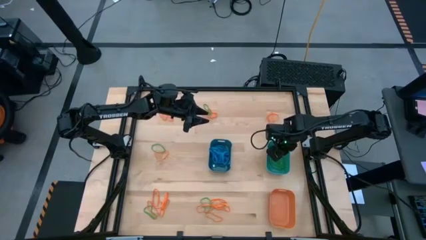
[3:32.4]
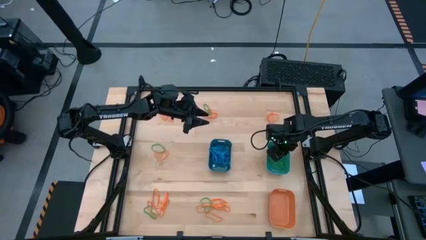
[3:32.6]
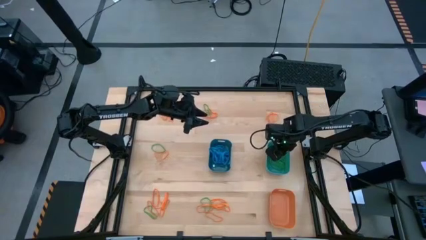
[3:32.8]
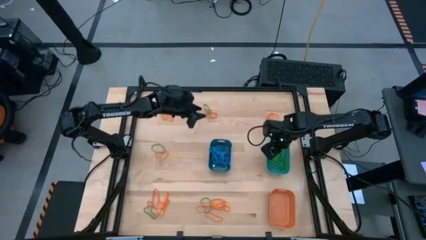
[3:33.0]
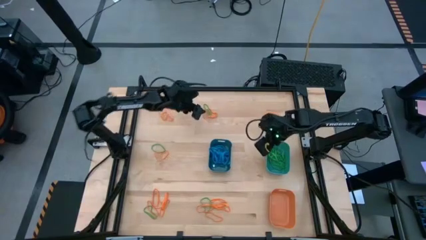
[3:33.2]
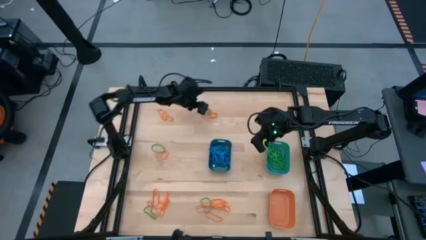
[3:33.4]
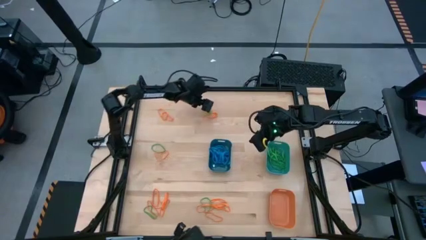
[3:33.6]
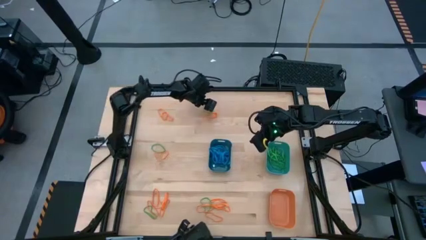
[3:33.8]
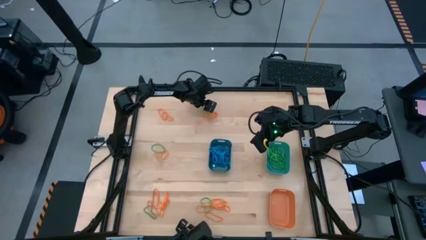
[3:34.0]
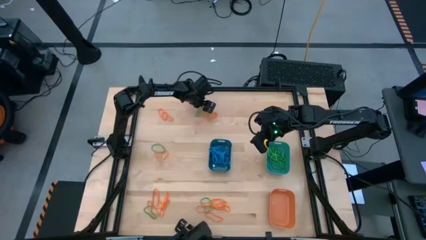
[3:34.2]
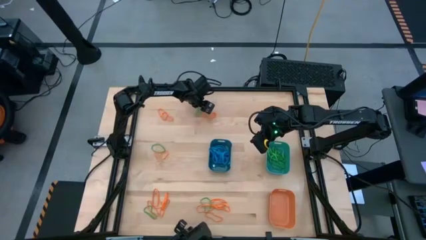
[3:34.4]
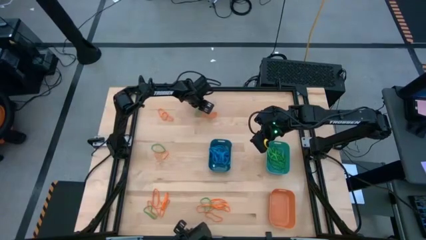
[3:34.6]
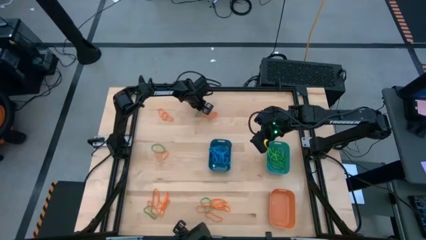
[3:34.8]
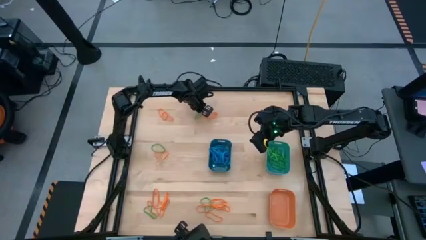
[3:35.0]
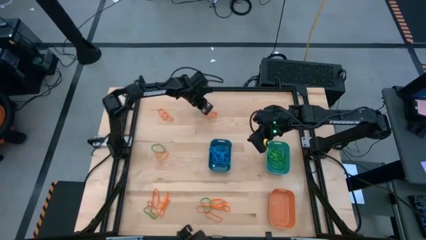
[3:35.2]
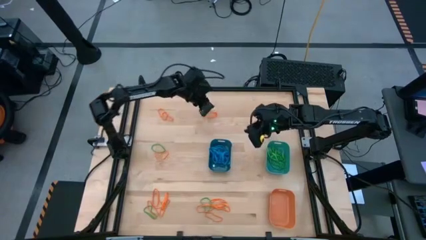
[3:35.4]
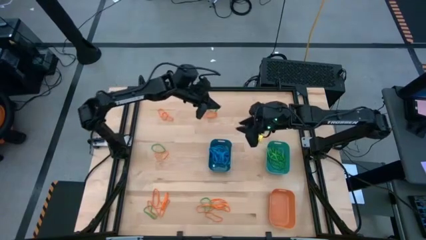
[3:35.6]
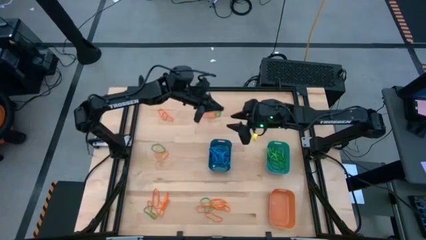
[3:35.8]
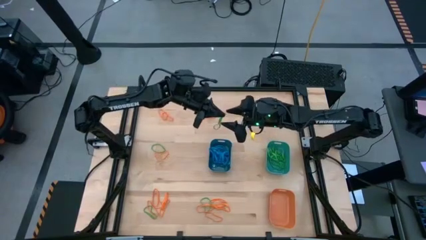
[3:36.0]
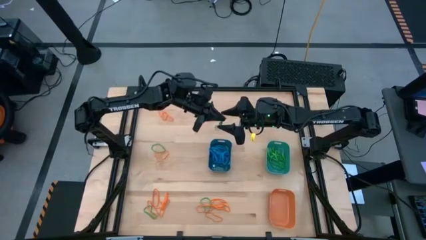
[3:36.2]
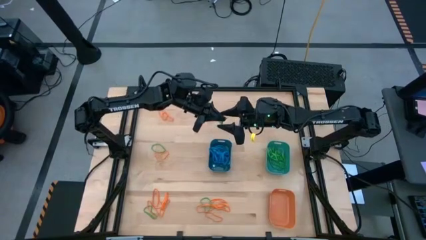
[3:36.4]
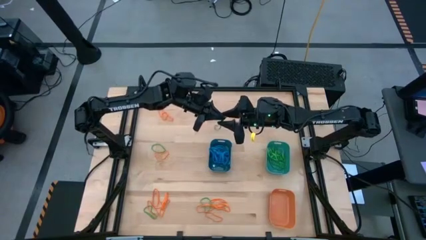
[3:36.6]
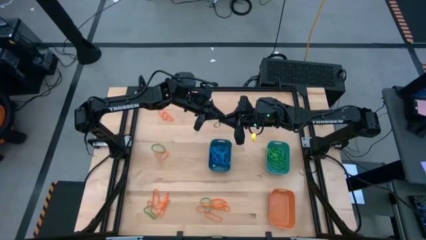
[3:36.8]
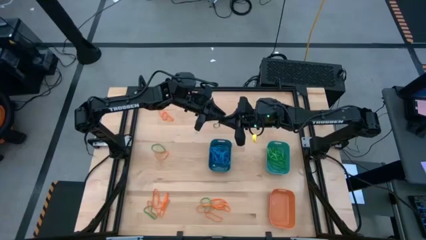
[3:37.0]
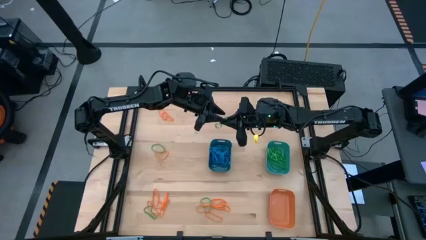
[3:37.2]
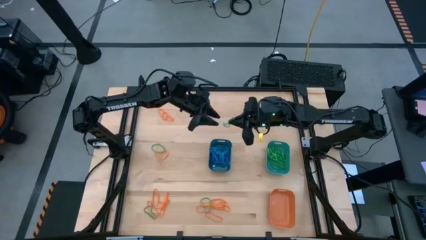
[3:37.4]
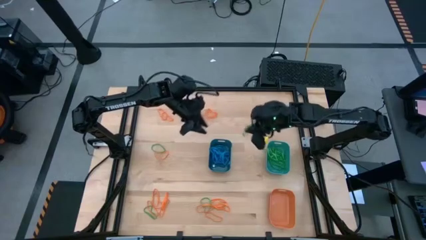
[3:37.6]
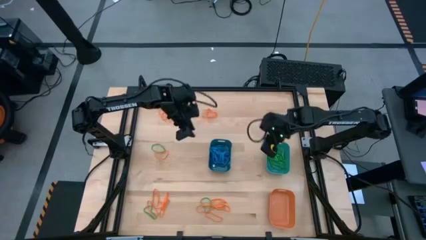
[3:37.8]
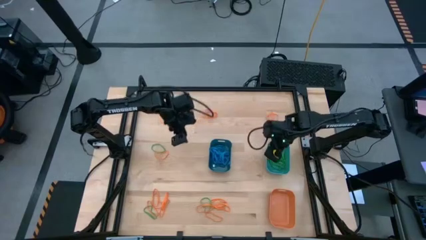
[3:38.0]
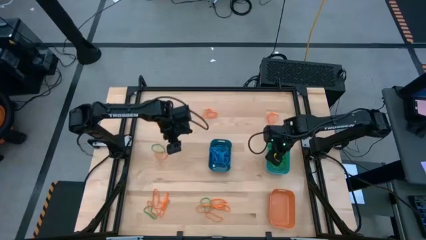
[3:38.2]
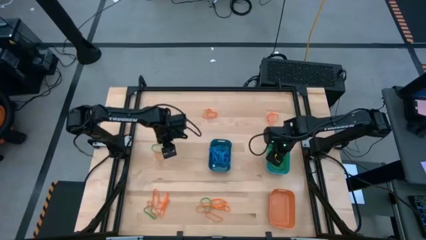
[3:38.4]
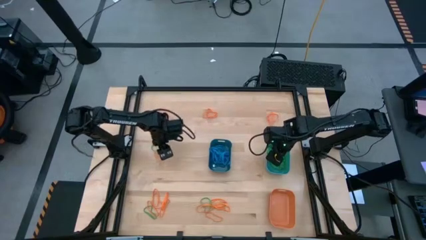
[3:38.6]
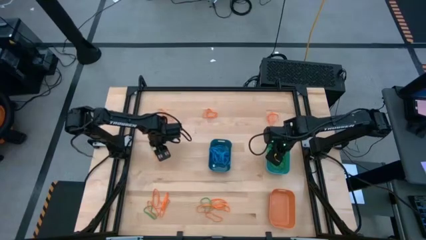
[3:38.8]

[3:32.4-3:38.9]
Task: Sort rubber bands into baskets
Put the green rubberband into the light blue bin

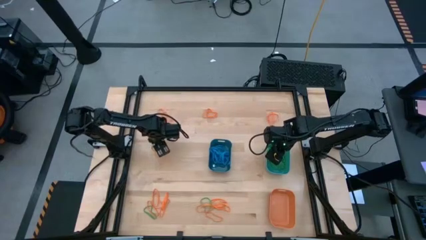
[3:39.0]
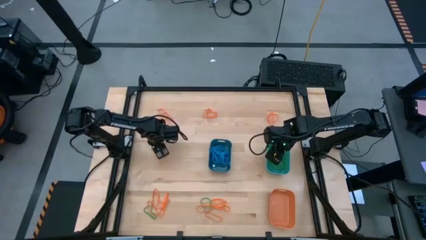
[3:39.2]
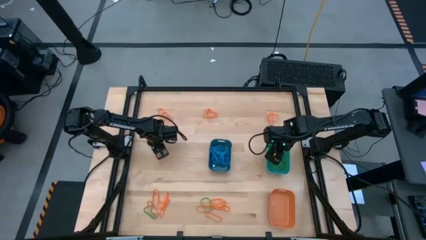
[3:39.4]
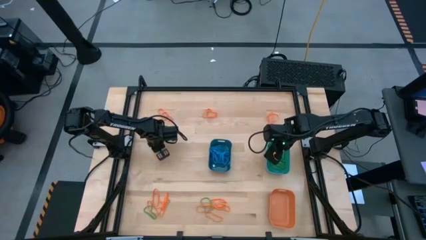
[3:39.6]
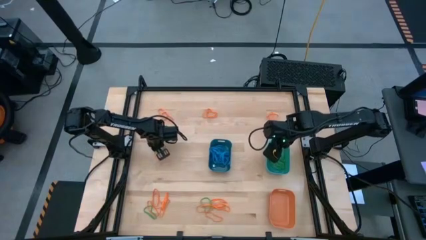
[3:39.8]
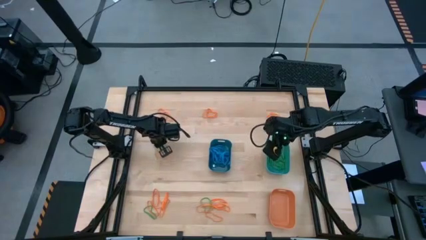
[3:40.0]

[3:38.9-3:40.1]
Put the green rubberband into the light blue bin

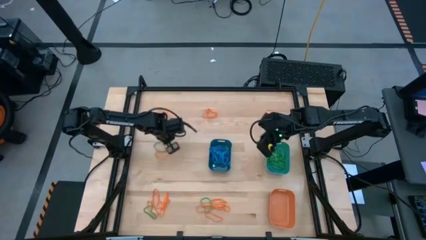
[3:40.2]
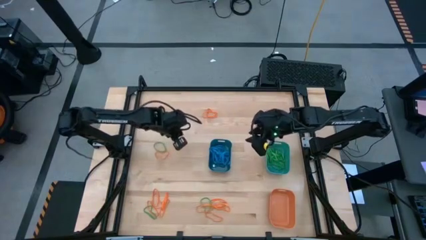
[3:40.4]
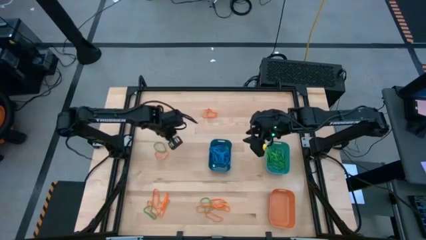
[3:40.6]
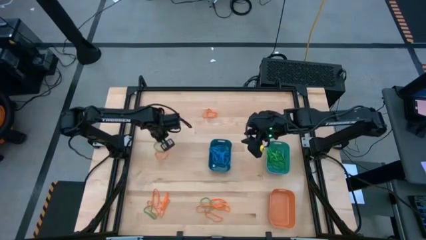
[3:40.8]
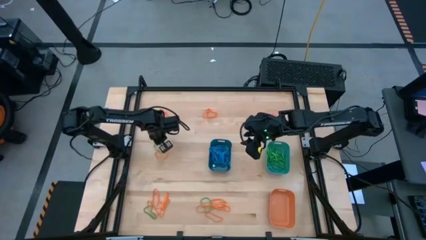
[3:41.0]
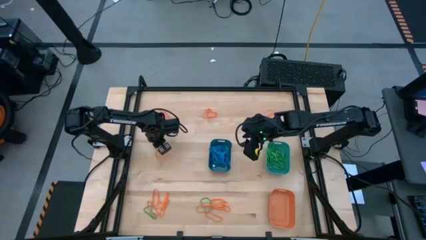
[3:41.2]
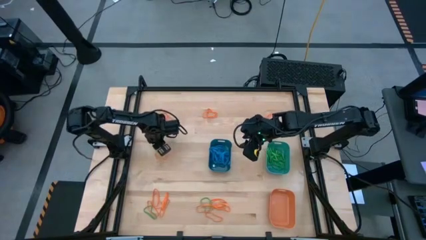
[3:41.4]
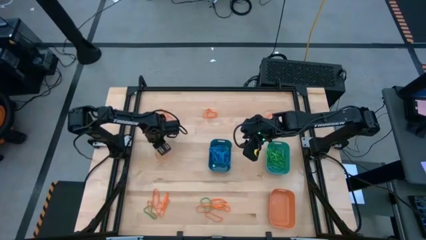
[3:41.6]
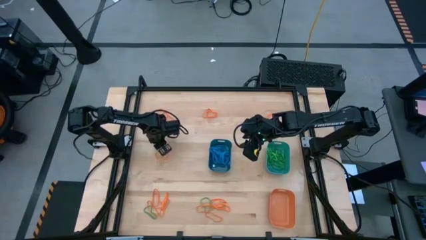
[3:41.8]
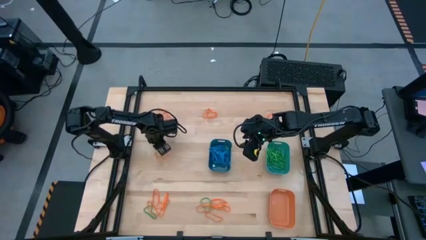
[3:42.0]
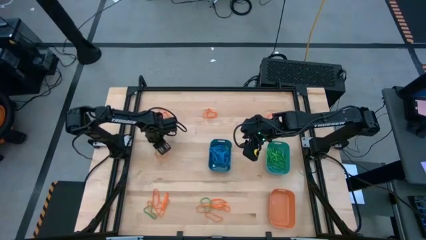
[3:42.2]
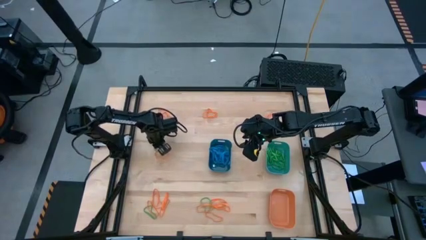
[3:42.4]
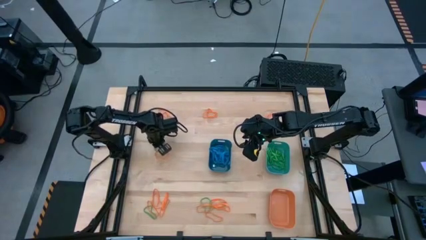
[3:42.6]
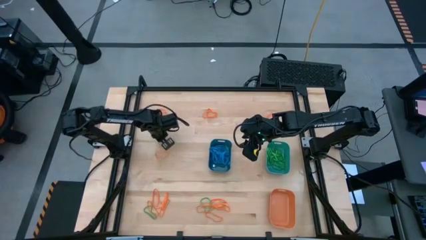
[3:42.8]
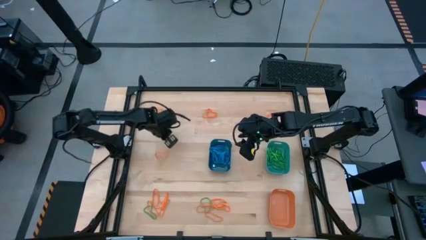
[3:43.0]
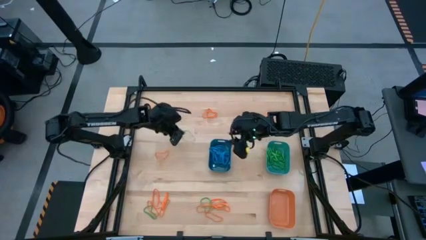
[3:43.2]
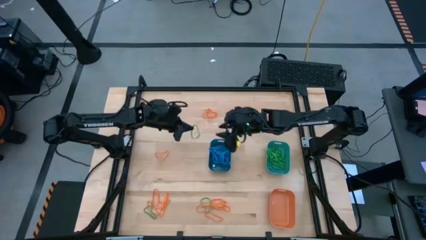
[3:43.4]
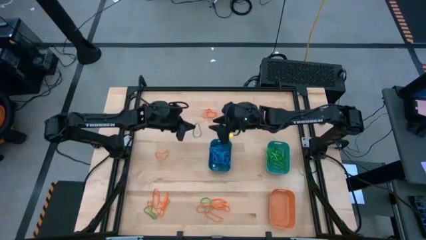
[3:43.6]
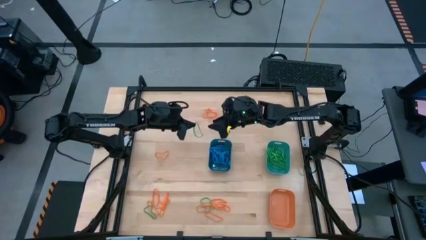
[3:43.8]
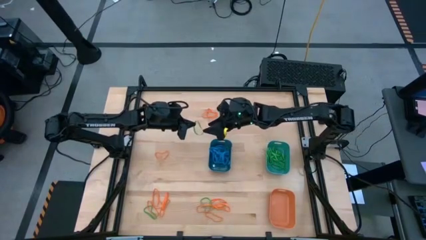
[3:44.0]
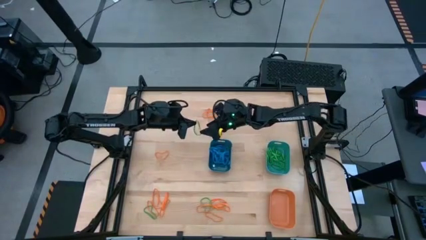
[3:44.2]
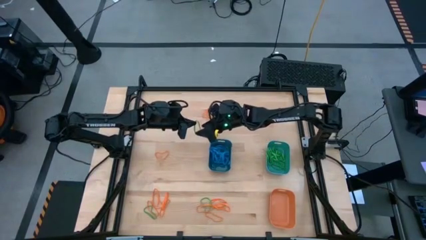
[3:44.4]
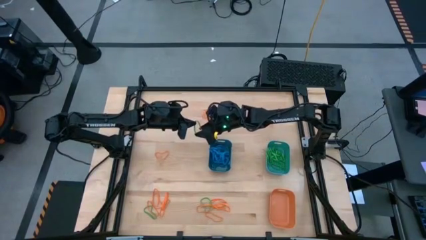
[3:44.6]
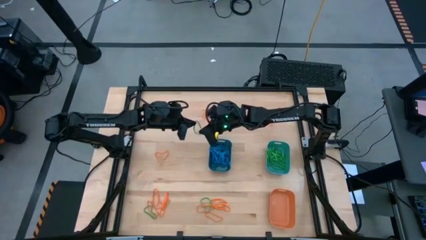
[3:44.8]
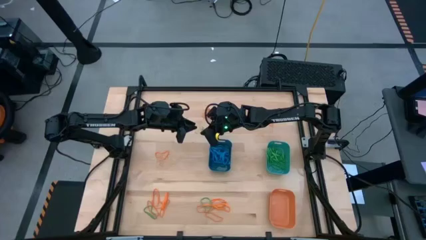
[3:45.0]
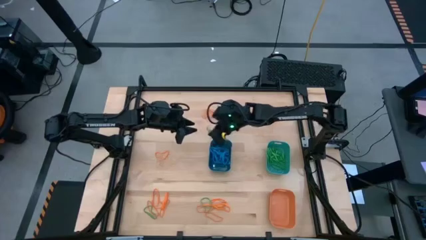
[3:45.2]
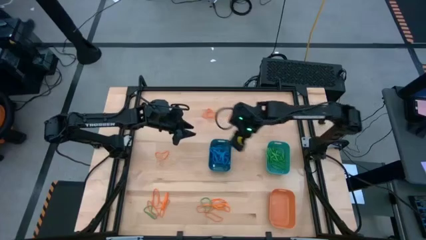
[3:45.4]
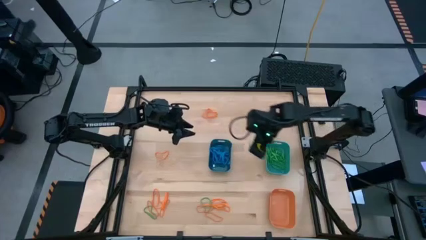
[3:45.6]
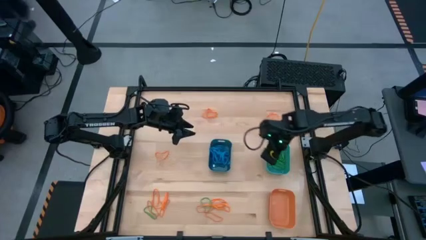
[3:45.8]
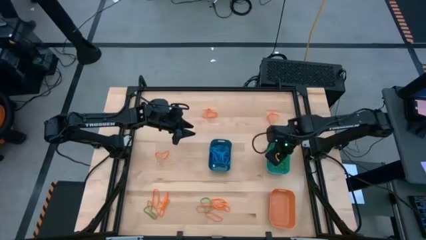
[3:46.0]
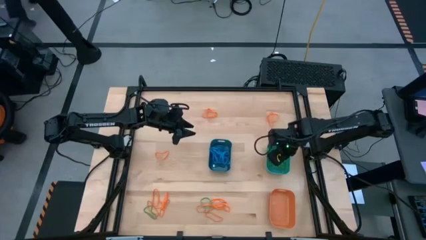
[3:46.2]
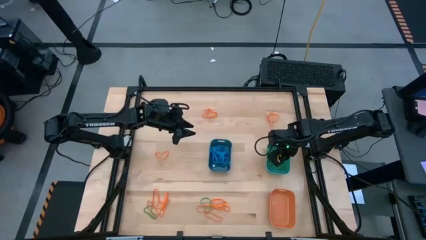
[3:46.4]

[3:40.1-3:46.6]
Put the green rubberband into the light blue bin

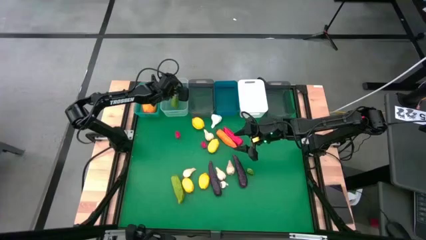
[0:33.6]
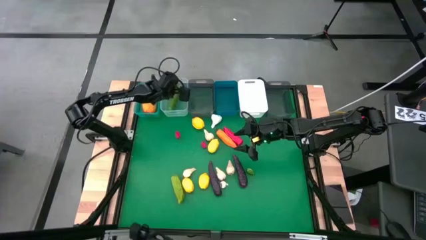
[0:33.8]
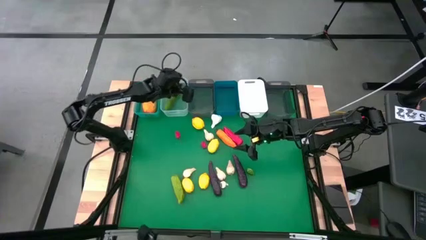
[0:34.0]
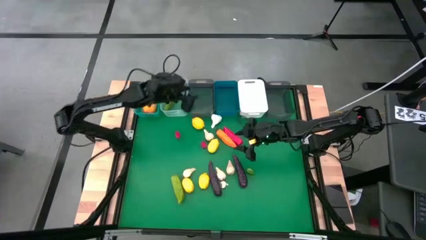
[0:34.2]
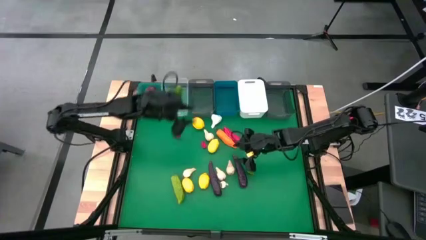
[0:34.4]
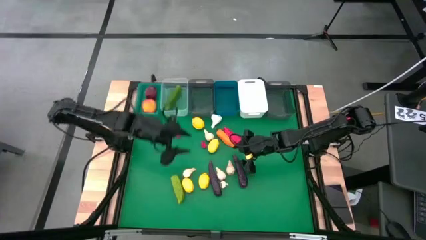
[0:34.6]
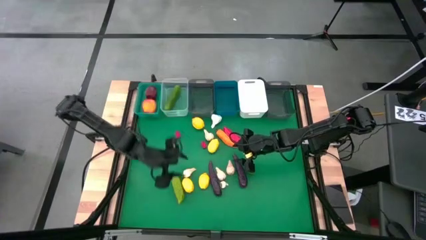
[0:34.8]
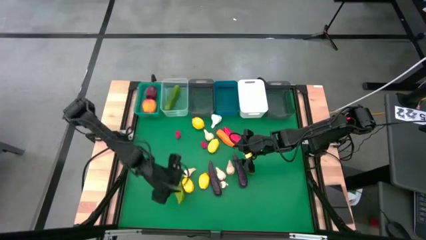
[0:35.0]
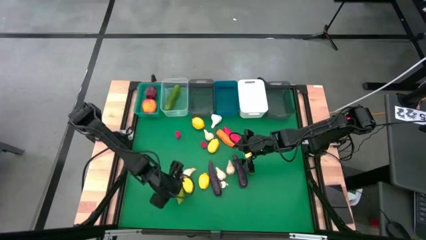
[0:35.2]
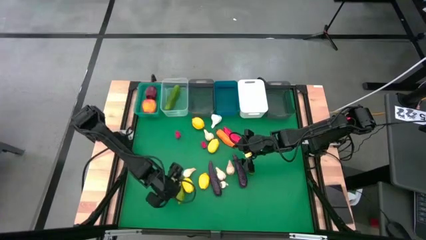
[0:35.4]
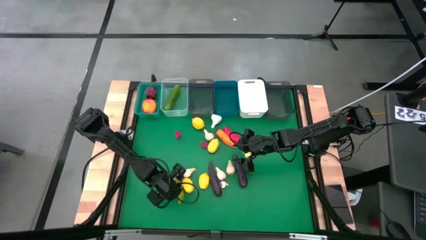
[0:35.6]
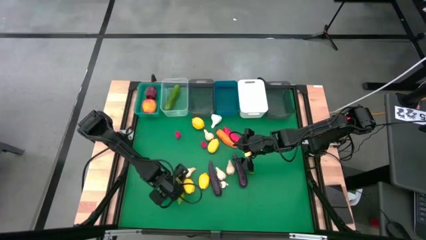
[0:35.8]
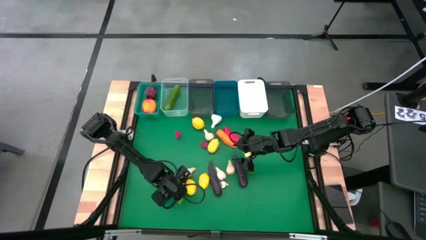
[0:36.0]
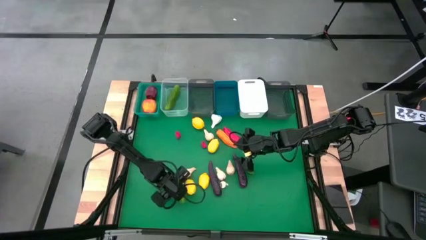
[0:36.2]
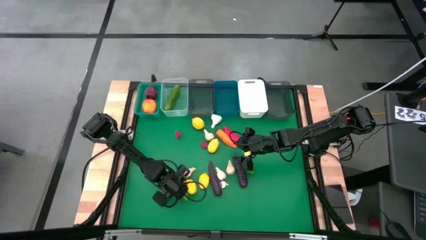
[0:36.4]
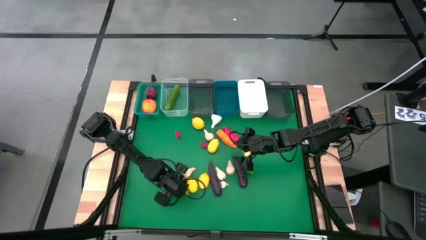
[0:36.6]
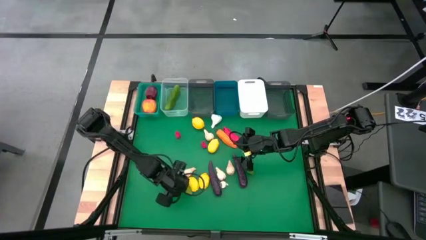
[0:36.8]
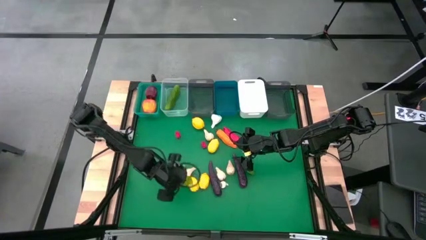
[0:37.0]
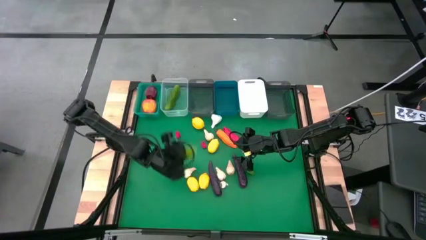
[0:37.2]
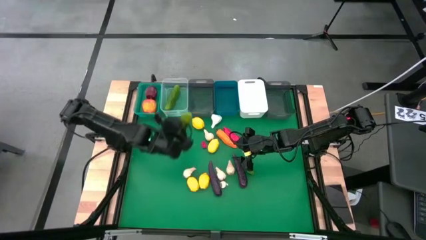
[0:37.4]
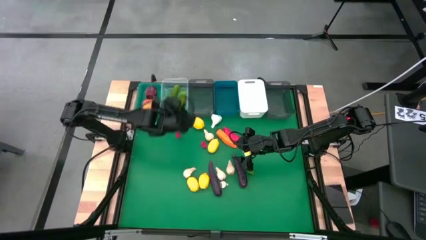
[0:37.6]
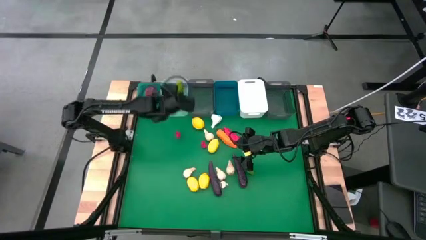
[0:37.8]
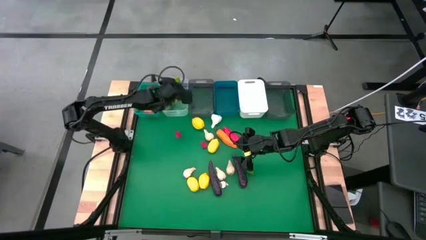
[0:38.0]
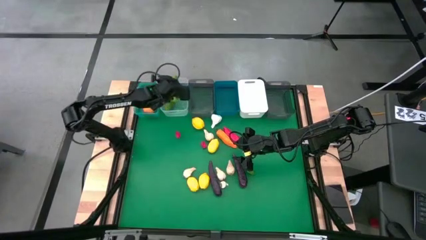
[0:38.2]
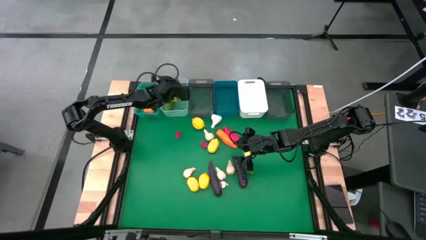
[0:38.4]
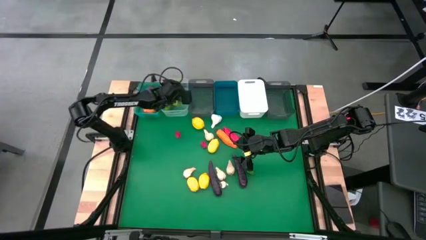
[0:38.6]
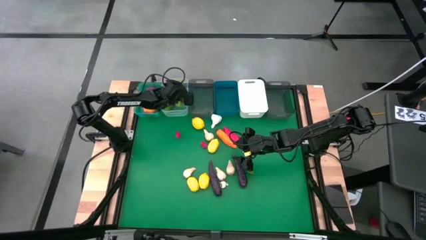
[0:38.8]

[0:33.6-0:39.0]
Task: Sort produce into baskets
Put the cucumber into the transparent bin
